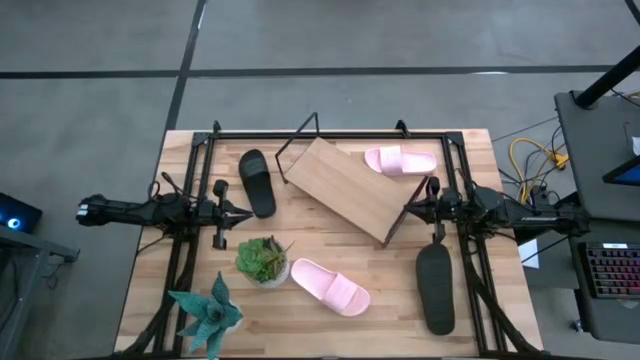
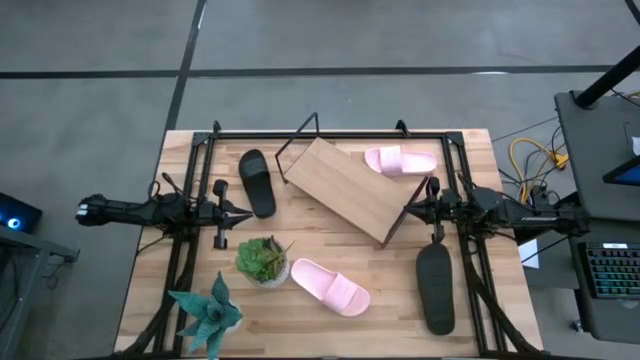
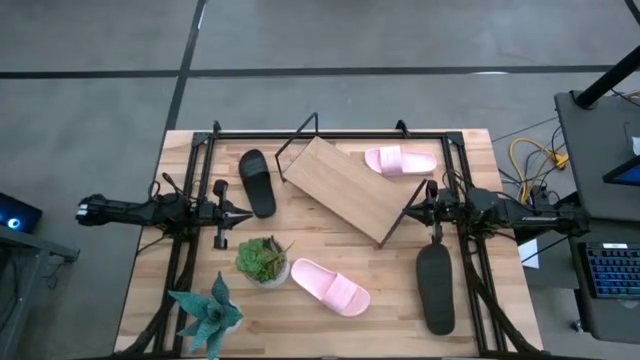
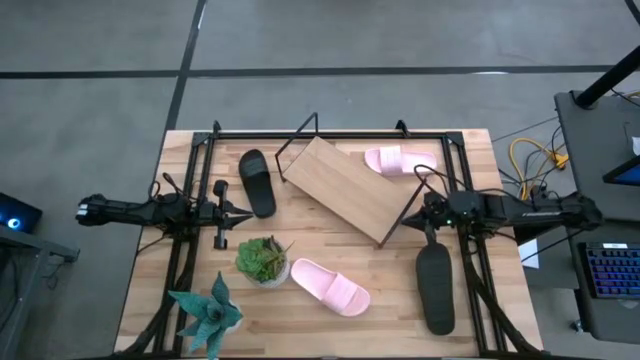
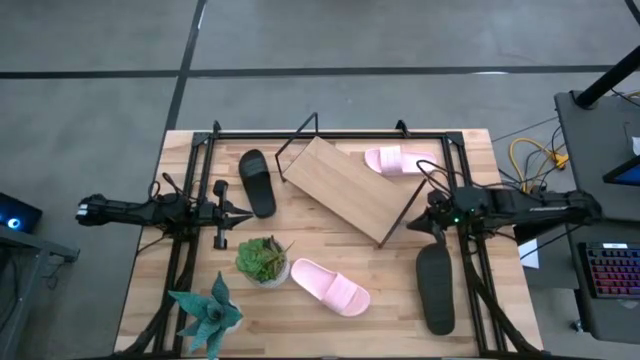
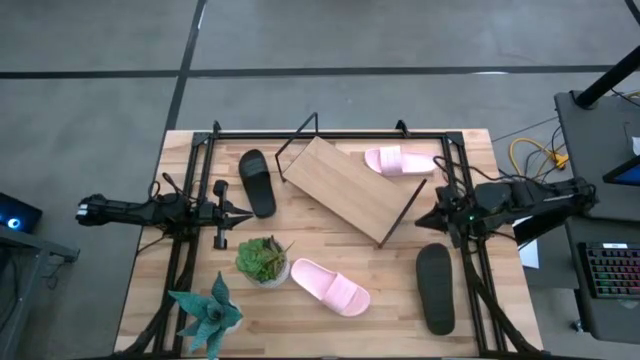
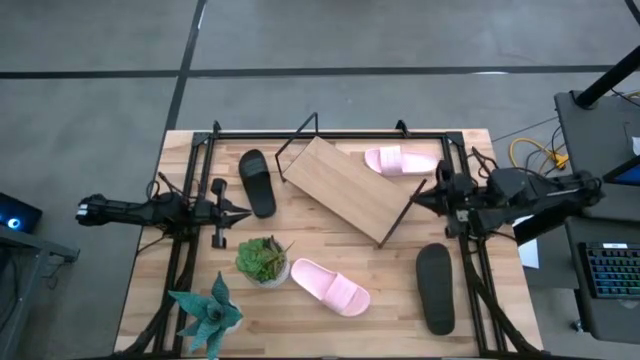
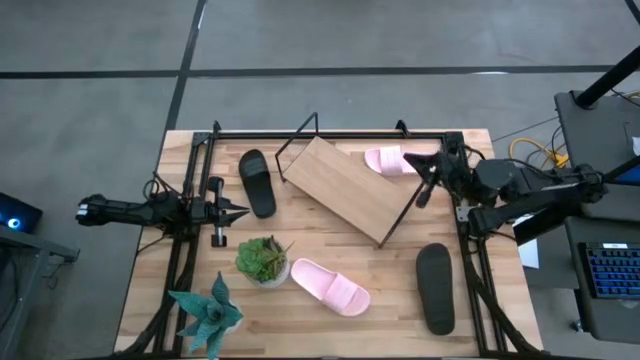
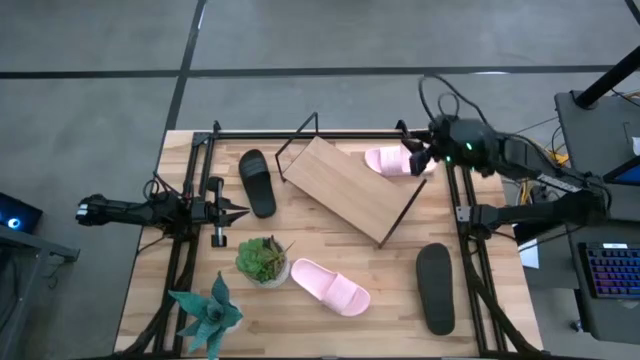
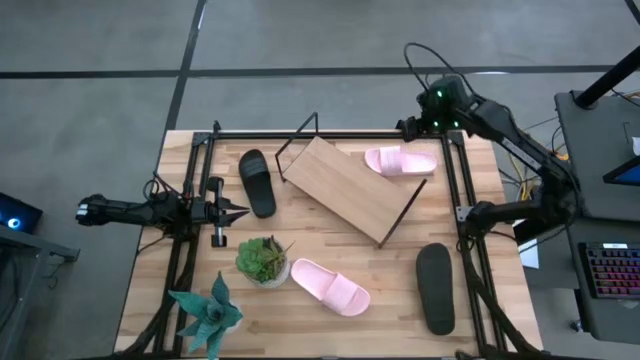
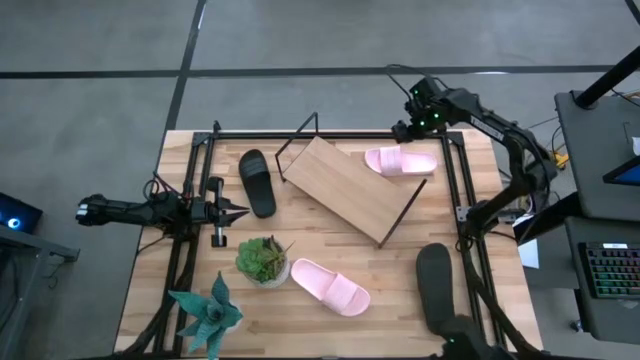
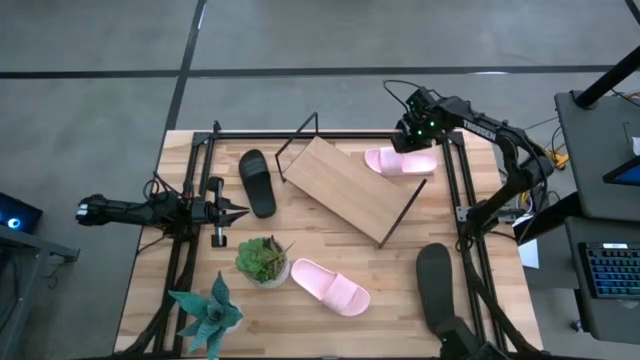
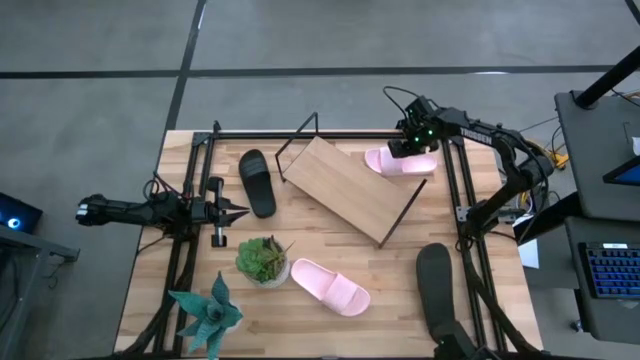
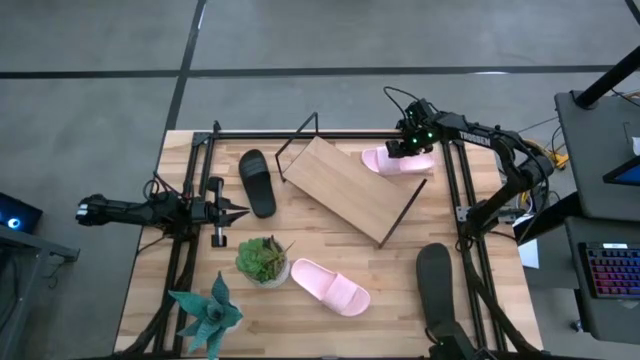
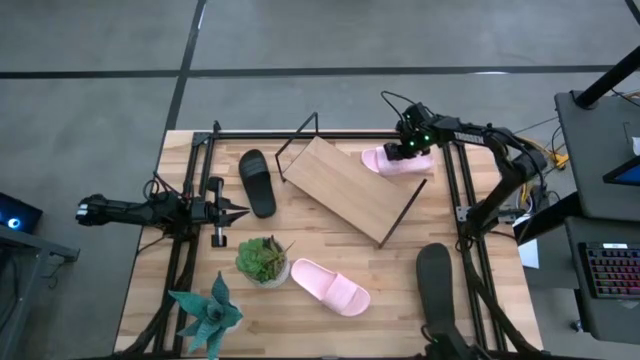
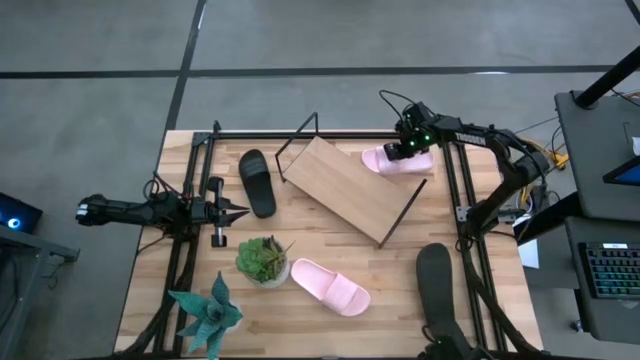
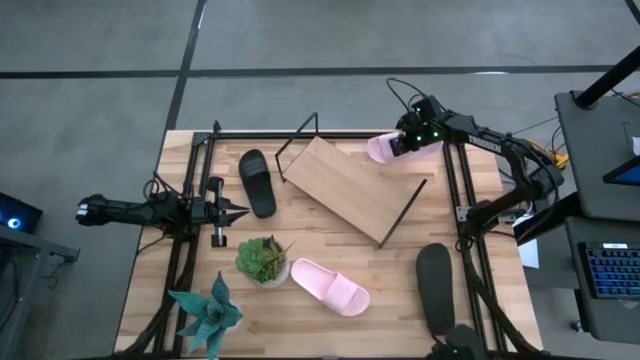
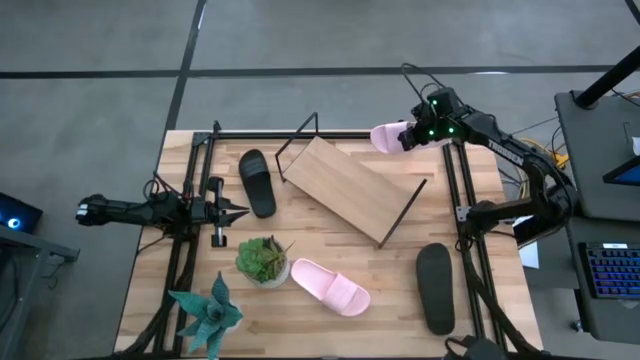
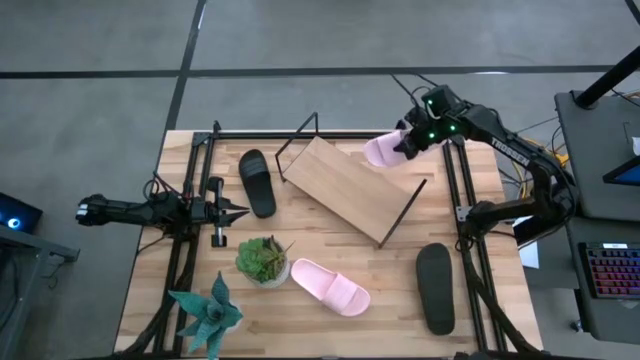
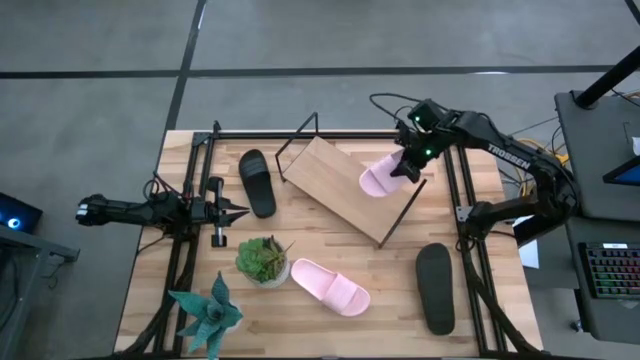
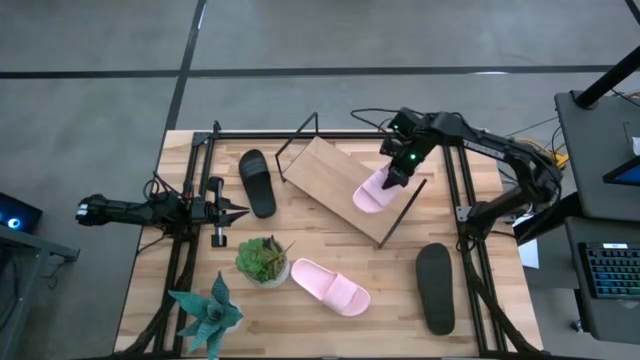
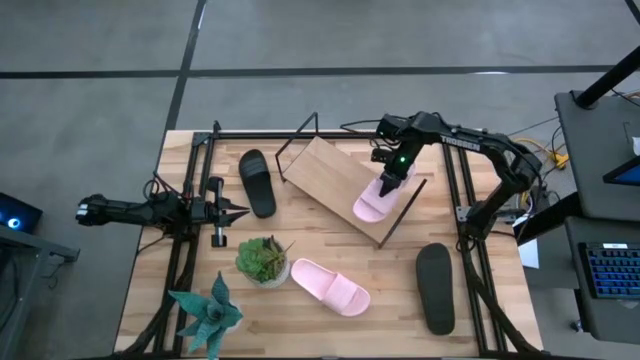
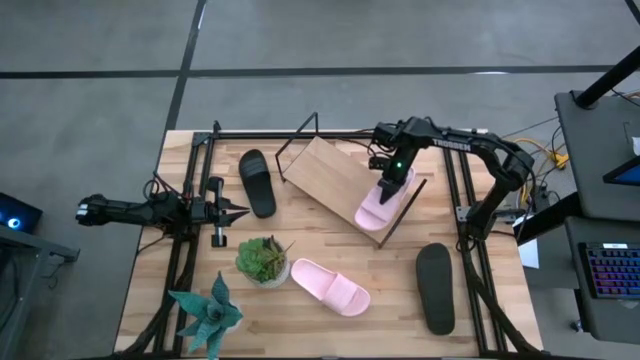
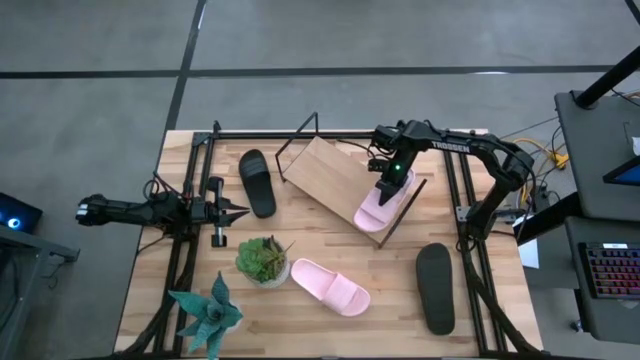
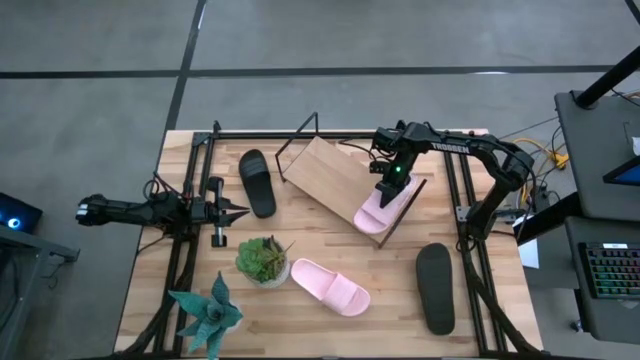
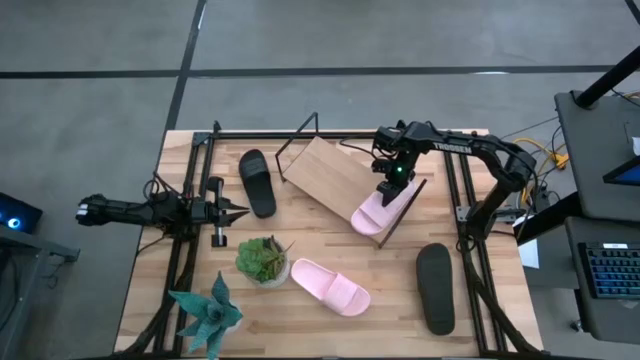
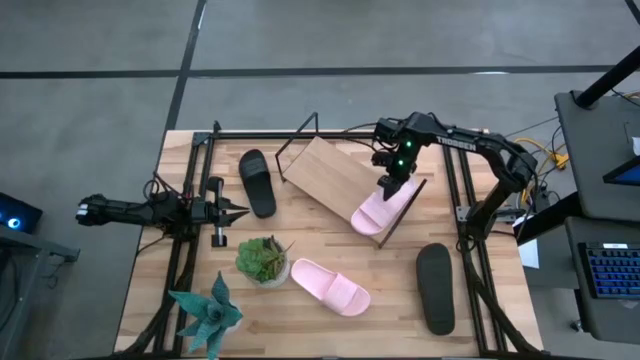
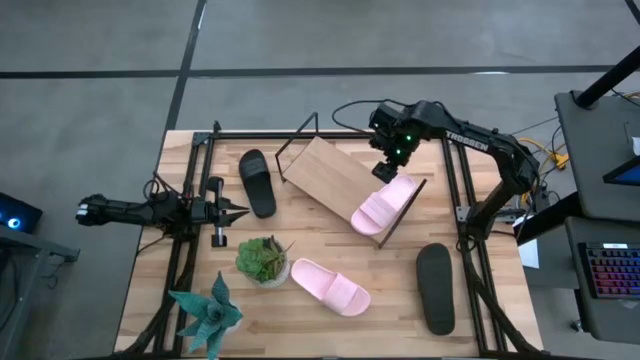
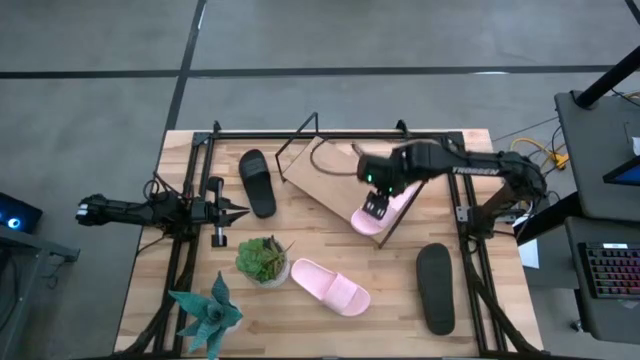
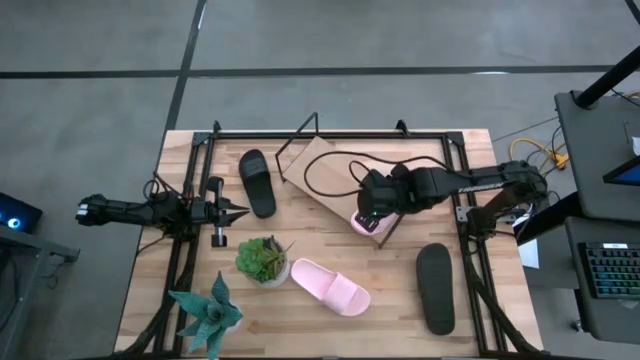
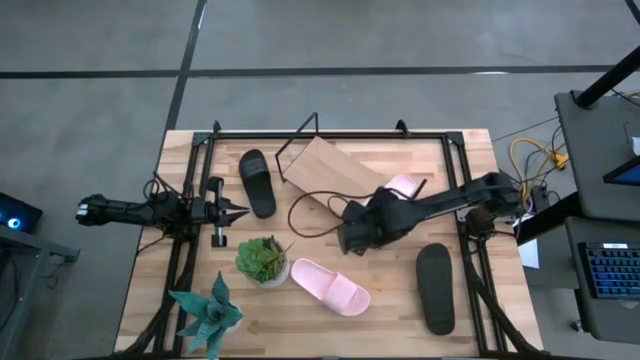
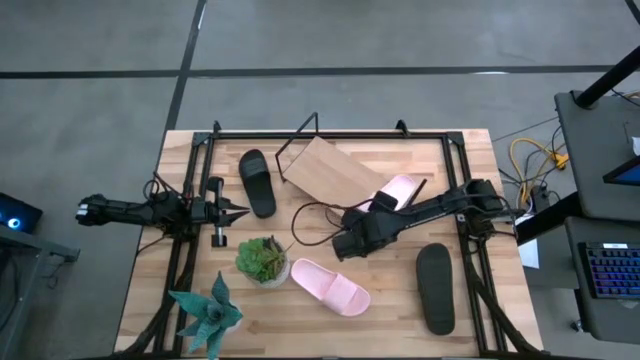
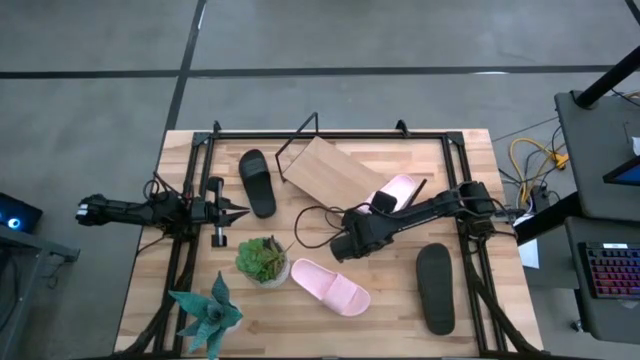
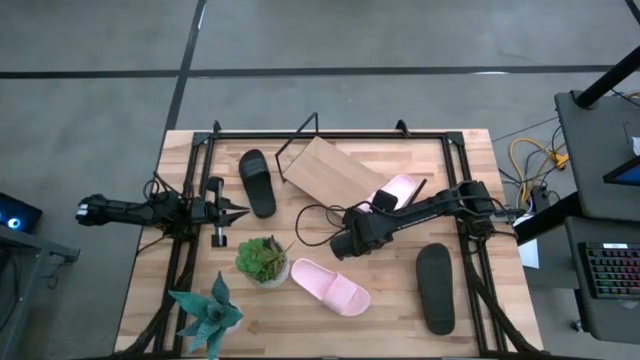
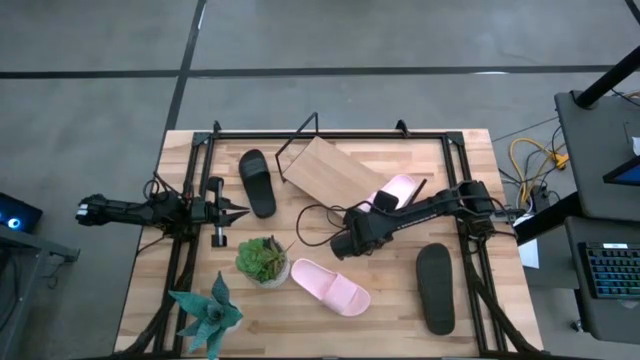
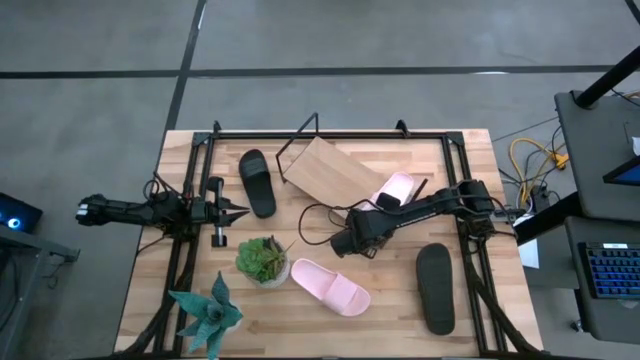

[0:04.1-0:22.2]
Task: Pick and place slides into the shelf
Put the top pink slide on the shelf
